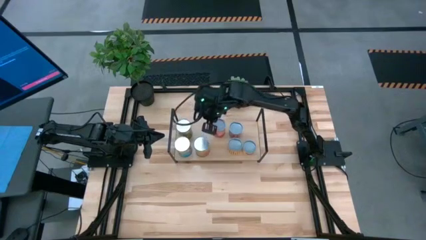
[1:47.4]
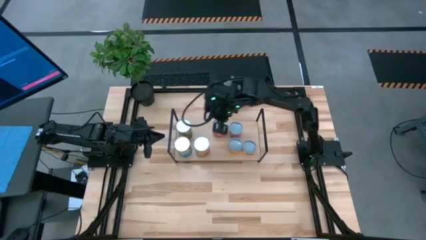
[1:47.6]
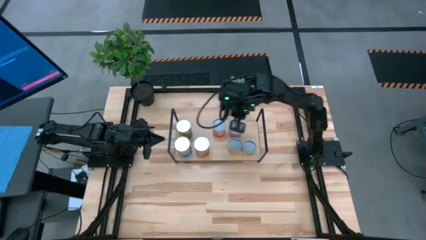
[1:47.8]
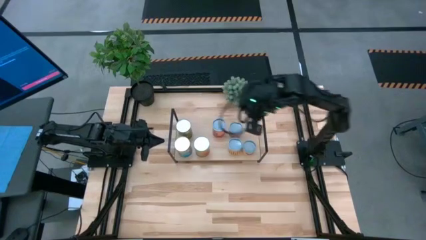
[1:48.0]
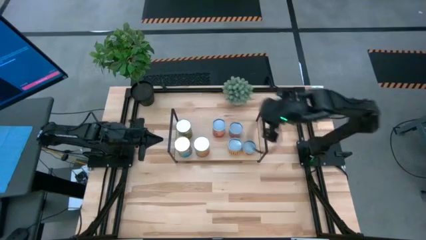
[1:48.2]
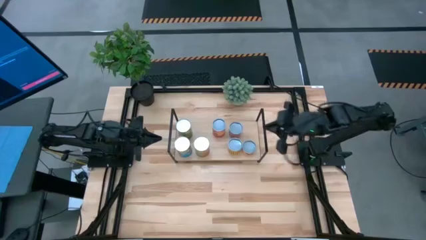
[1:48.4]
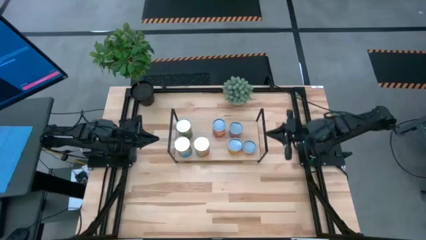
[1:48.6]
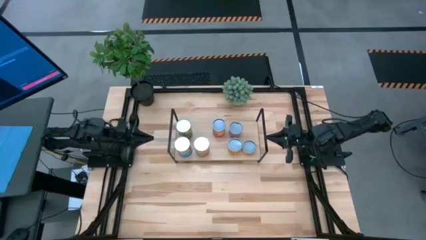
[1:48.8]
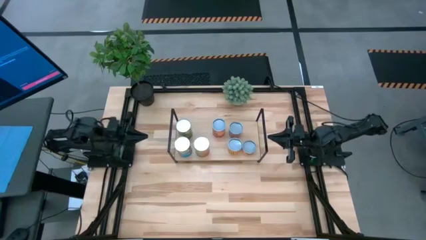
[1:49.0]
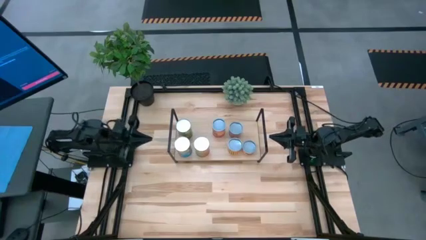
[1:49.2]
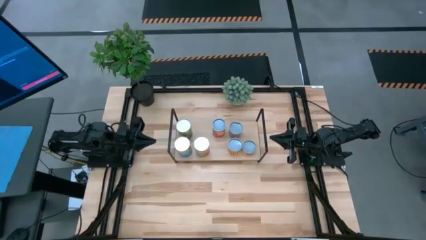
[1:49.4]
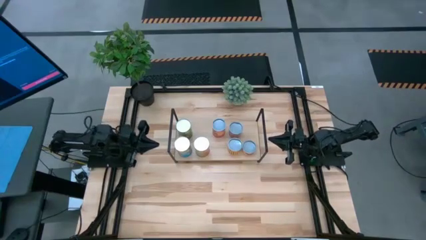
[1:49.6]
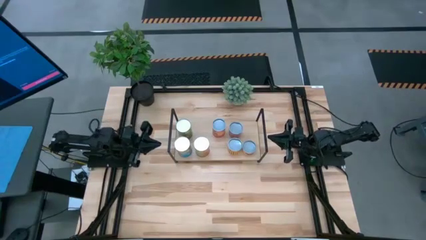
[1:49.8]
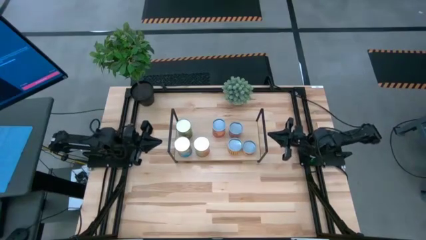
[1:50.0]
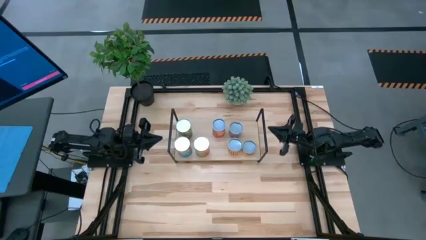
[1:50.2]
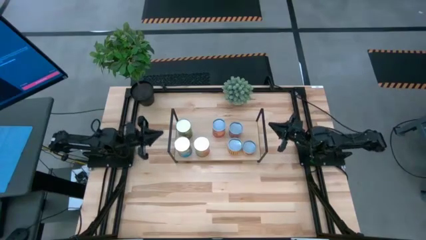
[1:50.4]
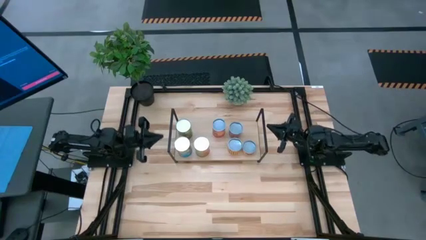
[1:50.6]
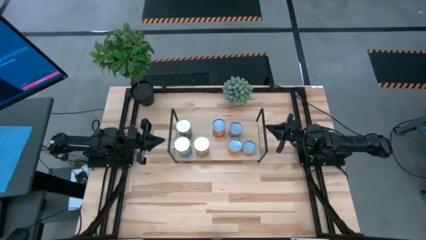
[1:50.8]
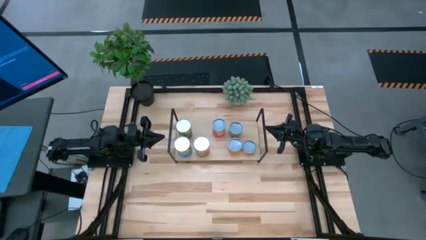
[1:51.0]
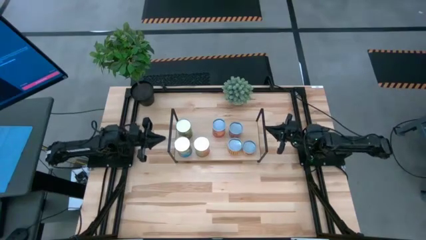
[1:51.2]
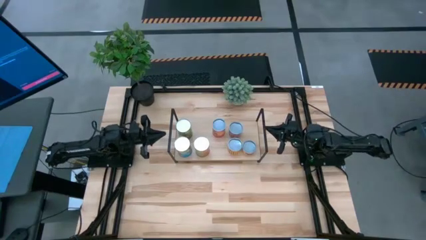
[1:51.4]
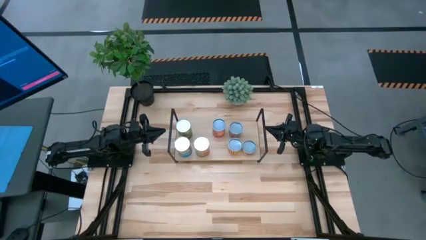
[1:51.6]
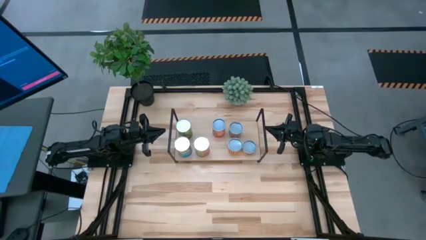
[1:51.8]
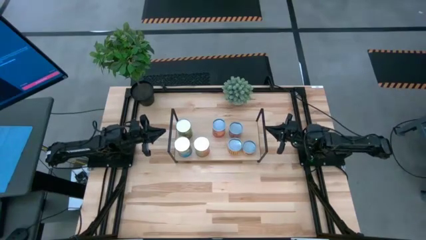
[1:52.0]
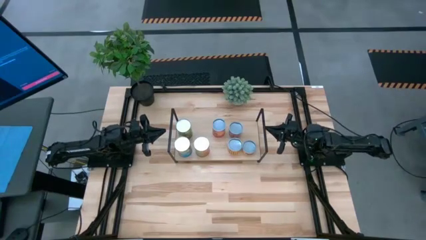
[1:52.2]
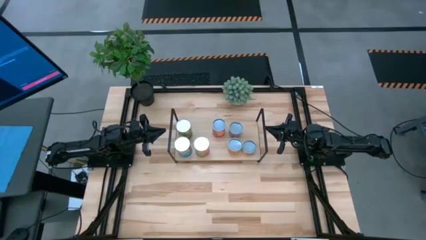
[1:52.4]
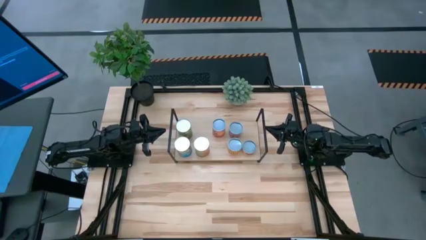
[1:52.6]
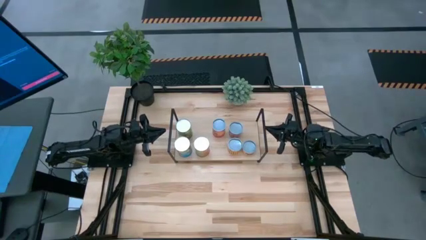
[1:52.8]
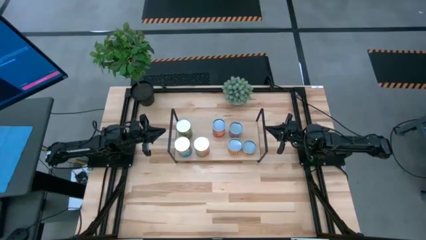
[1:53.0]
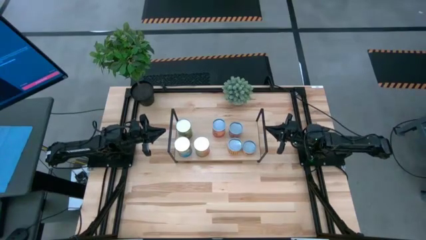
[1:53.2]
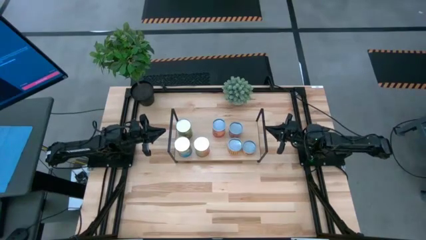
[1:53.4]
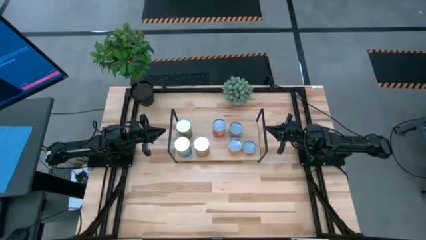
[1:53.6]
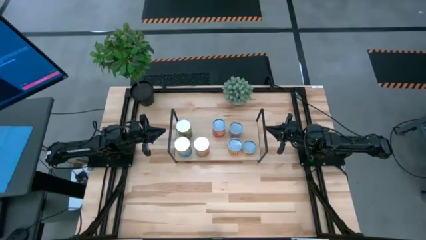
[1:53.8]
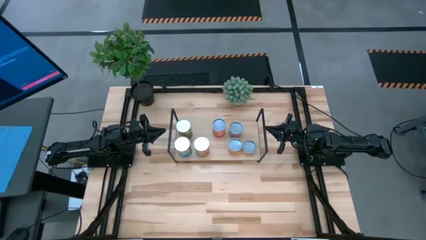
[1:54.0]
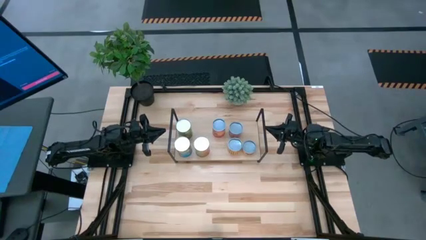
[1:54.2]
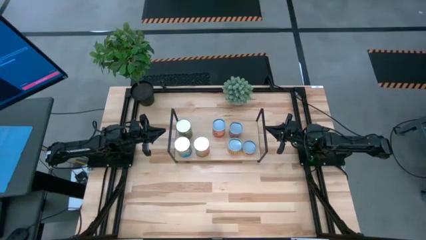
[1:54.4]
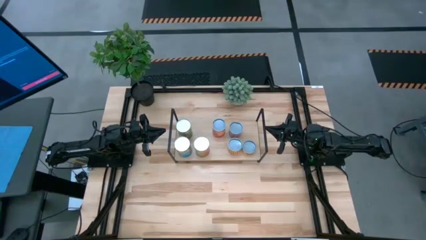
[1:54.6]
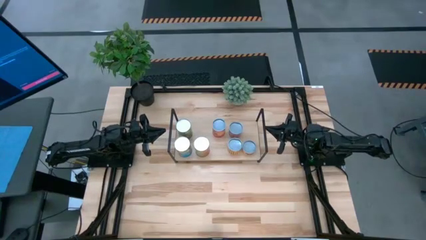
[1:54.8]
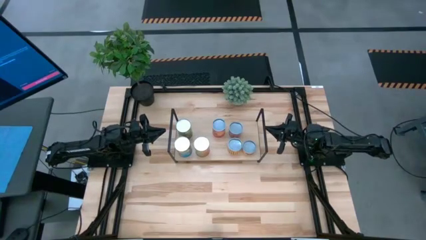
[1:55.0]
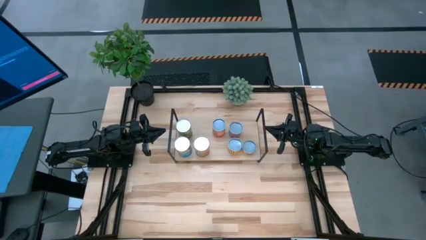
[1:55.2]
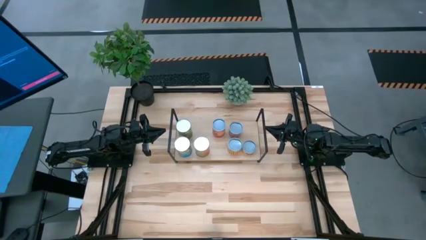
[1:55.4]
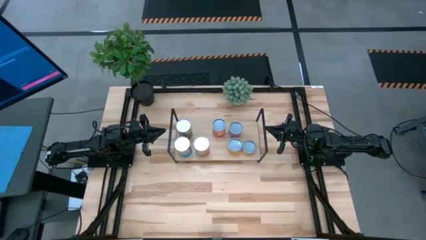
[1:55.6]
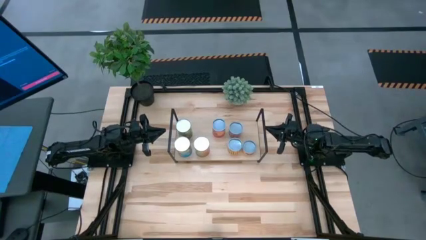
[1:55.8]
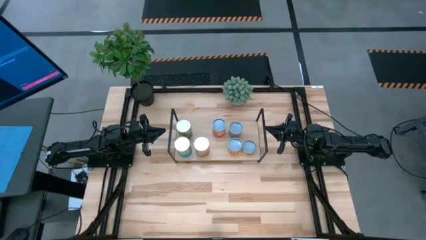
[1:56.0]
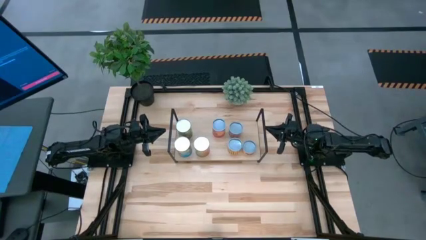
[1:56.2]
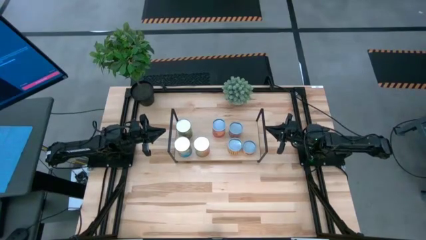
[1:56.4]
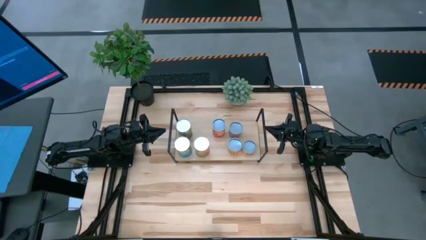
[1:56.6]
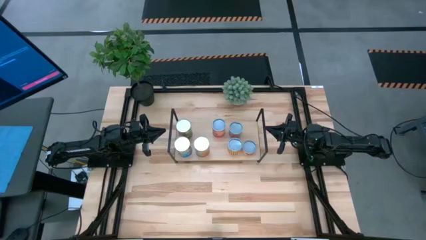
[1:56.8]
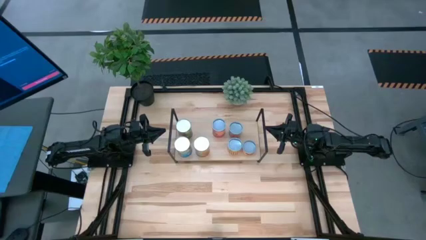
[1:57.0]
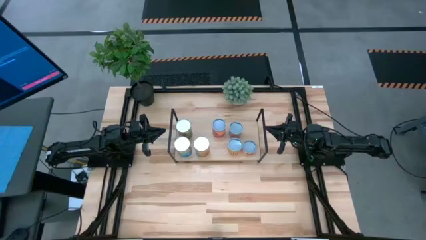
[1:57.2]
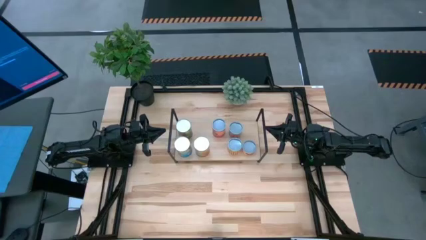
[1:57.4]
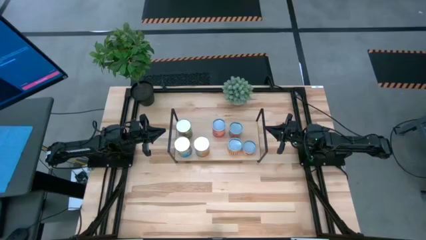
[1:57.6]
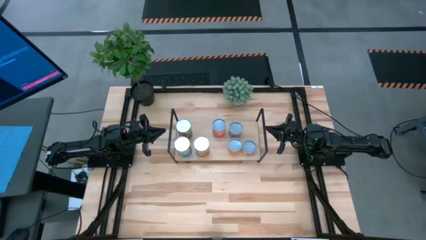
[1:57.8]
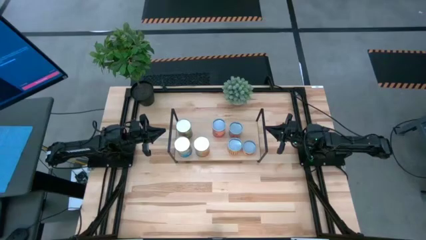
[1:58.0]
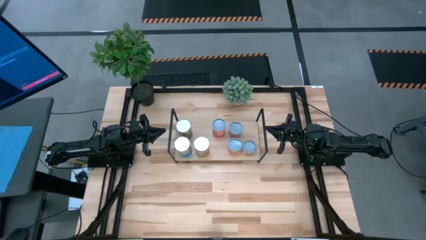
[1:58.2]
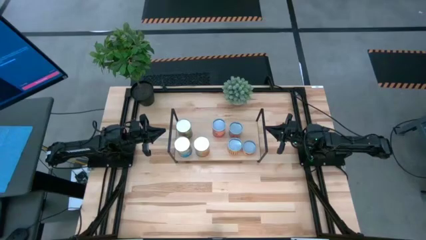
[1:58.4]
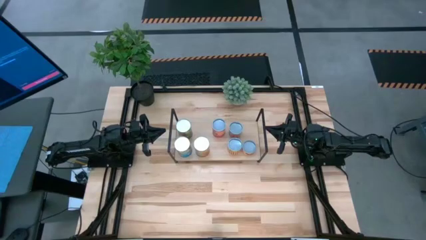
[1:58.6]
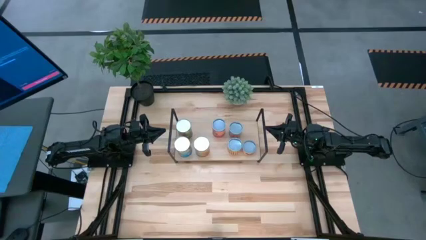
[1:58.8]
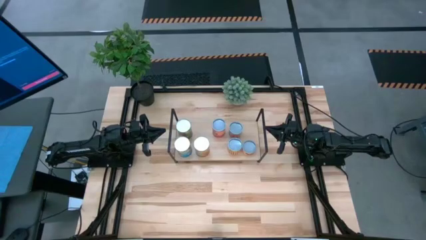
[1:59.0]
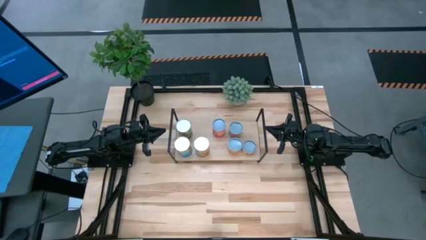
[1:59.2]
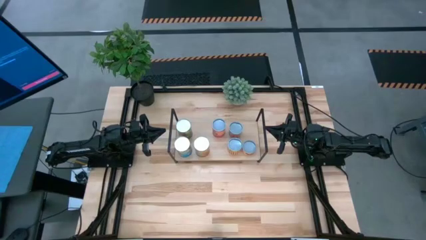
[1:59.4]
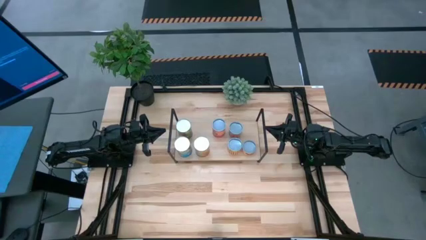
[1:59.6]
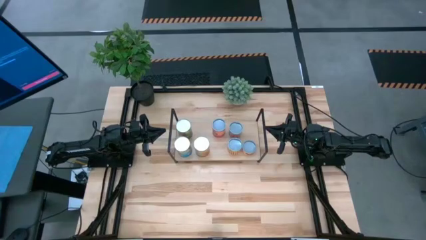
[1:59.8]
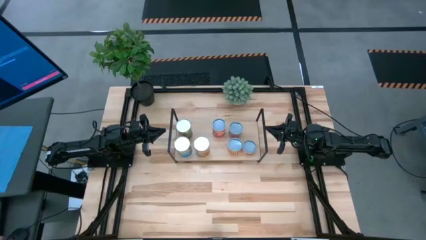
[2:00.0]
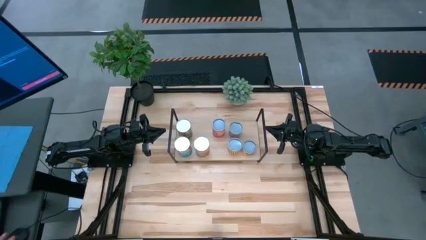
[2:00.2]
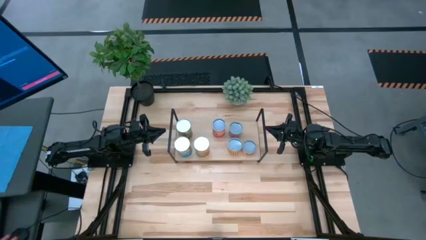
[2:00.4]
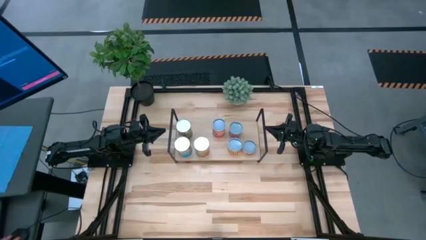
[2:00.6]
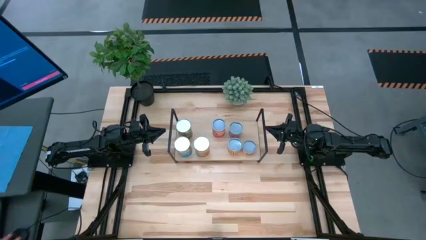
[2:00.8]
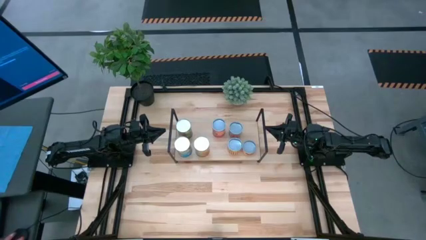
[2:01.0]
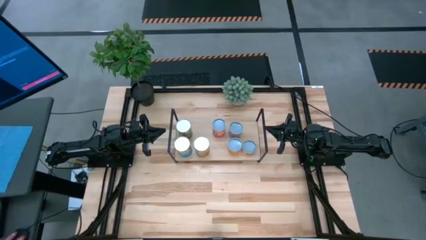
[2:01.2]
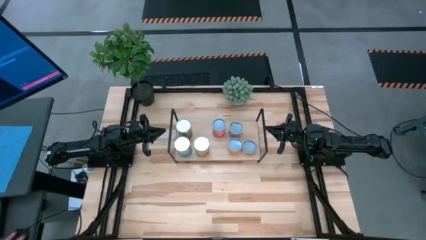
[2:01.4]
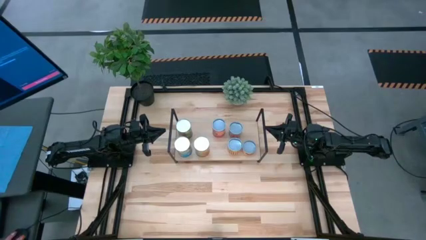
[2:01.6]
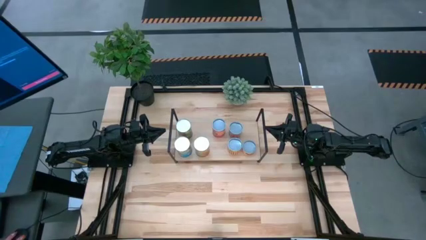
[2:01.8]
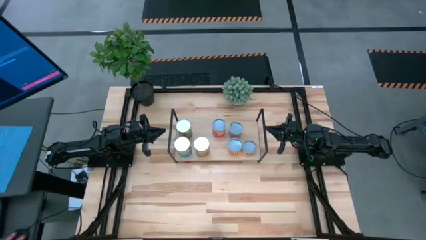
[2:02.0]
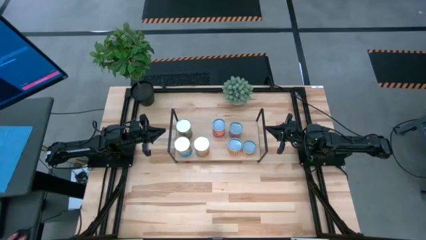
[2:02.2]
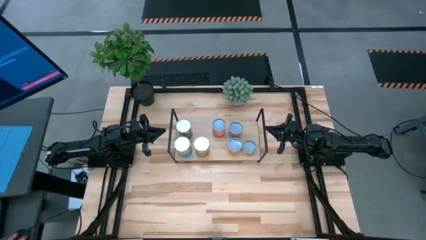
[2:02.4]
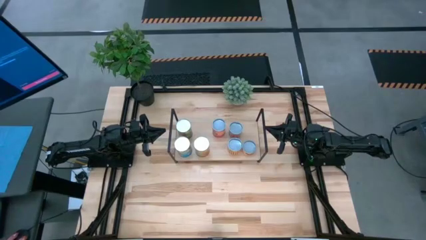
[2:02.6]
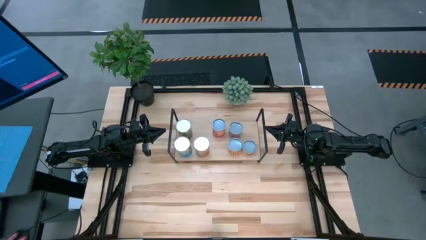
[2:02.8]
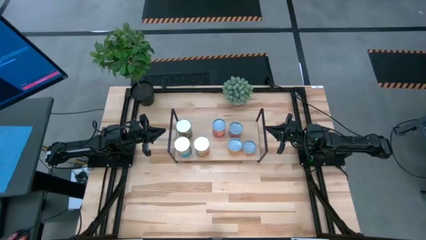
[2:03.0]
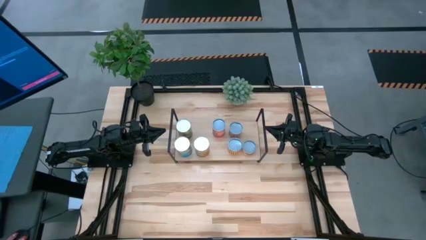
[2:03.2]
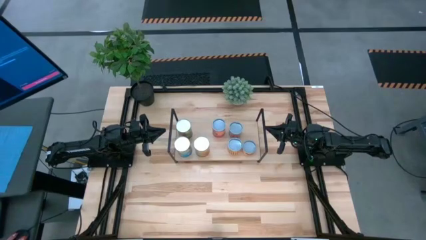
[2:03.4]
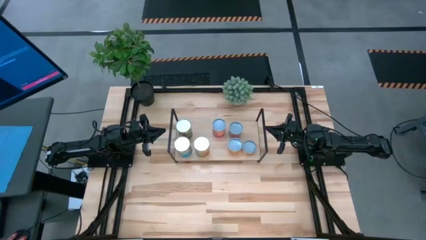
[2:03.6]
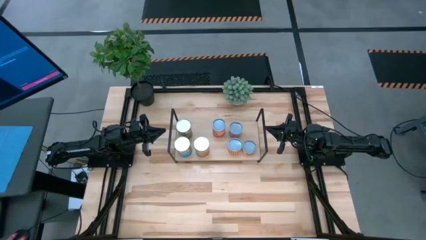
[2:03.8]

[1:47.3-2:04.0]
Task: Pick and place cans onto a shelf
Return to Home Position
